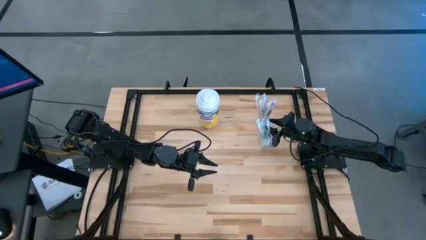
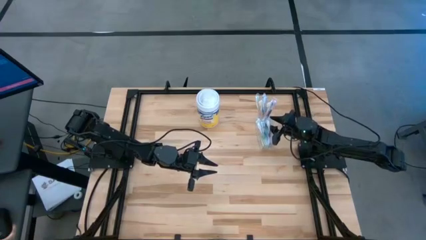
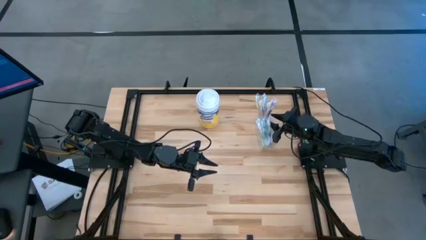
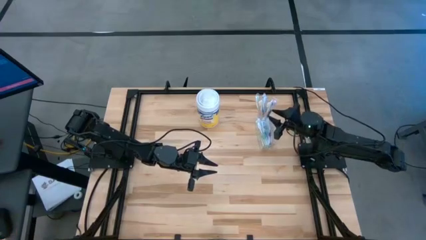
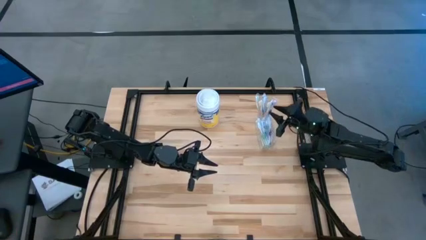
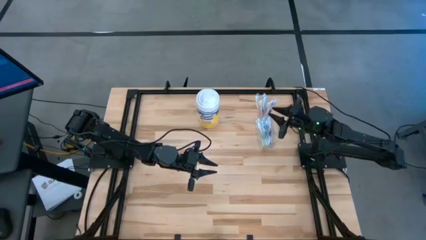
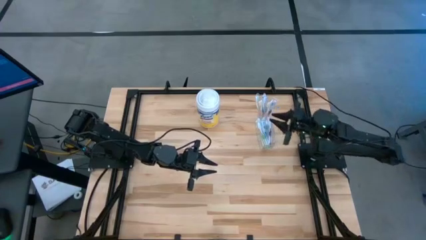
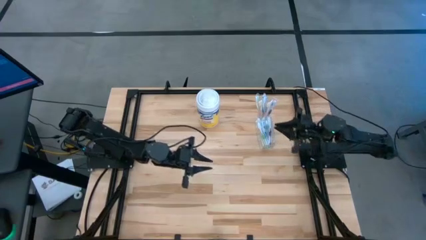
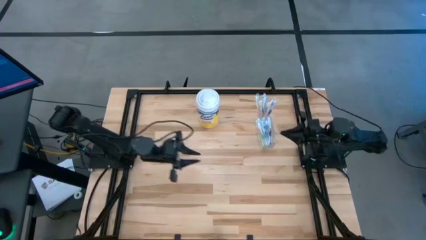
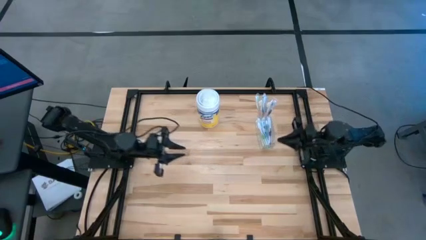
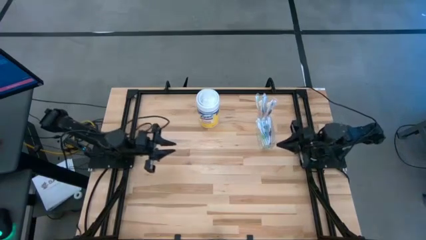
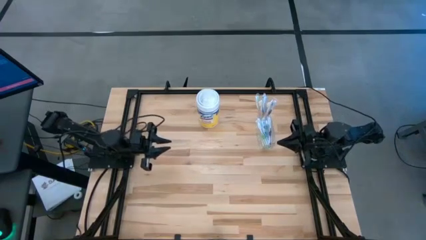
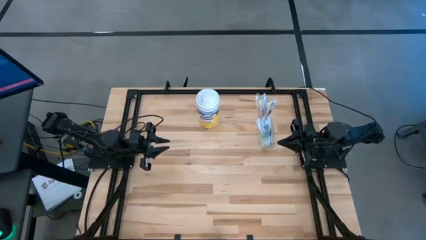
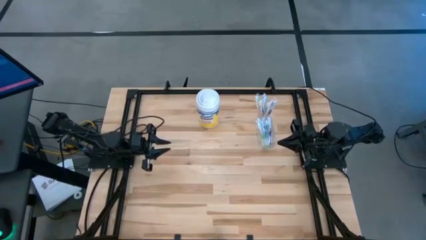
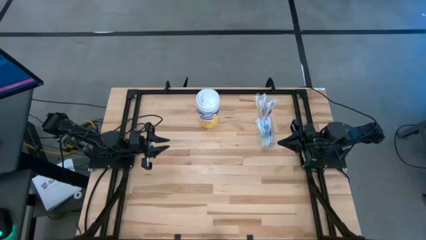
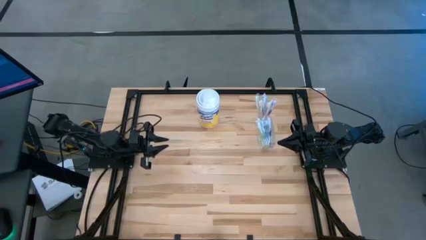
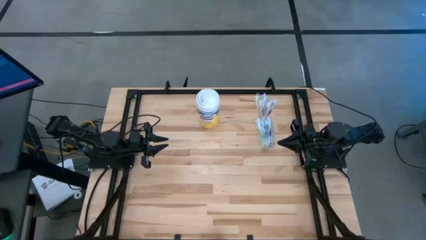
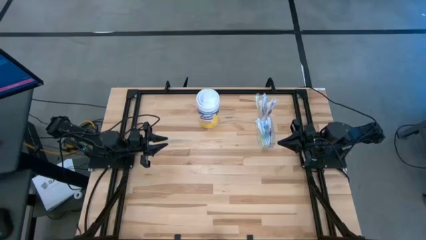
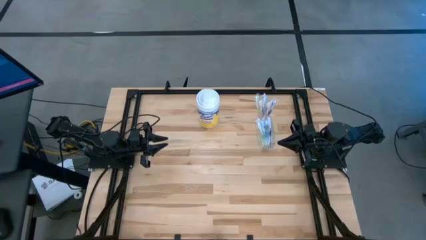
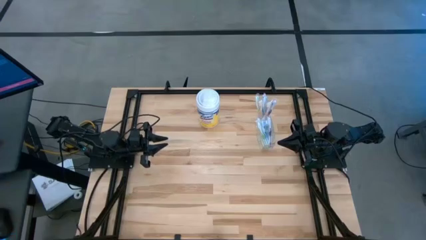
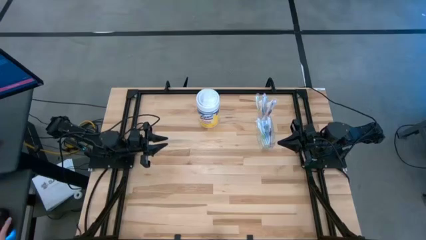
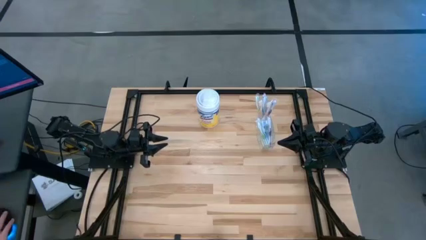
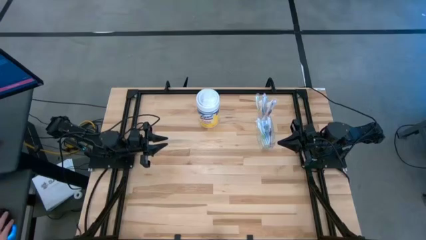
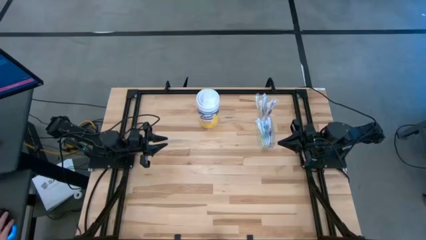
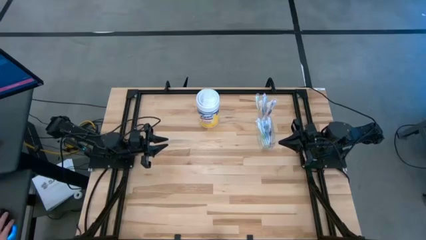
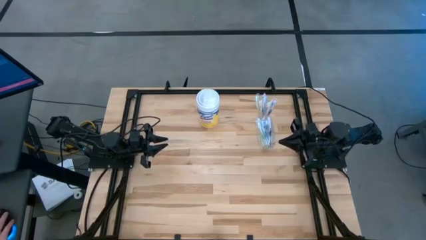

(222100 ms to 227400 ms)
Task: Pick & Place toothbrushing station
Return to Home Position

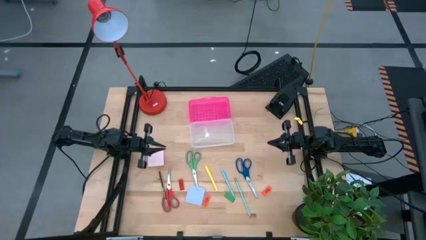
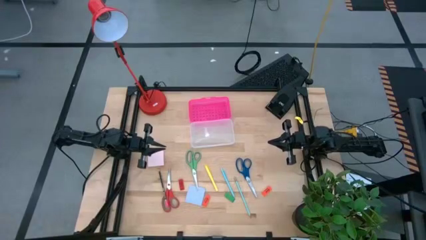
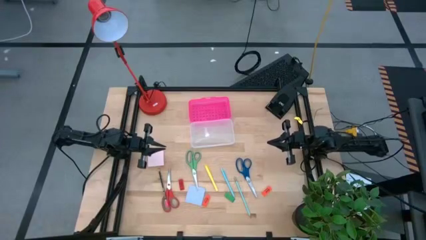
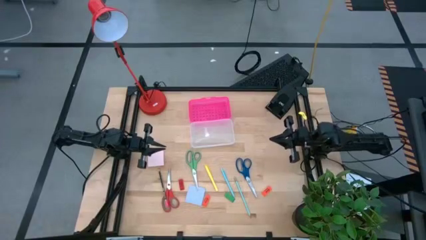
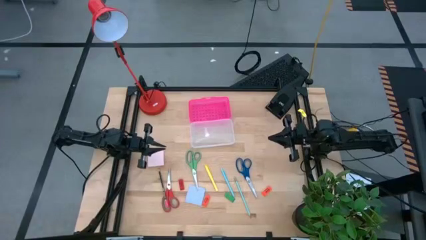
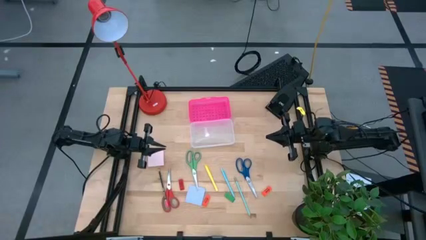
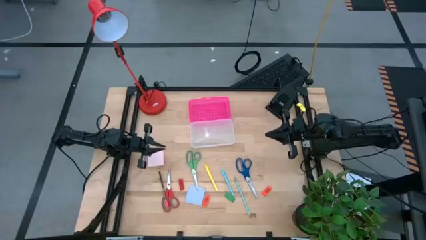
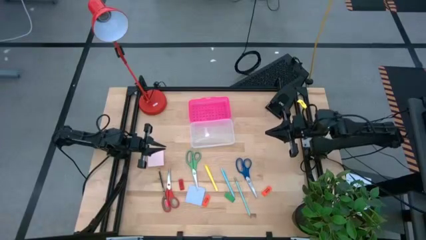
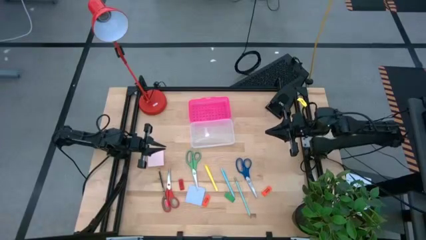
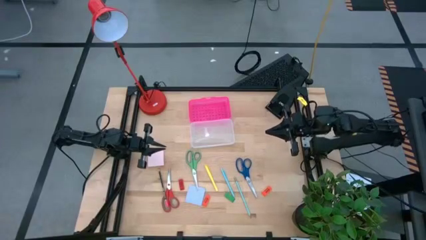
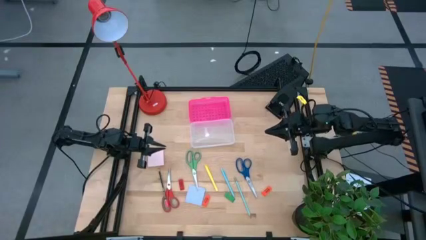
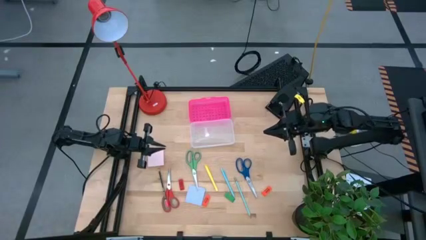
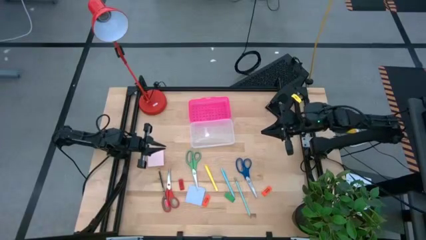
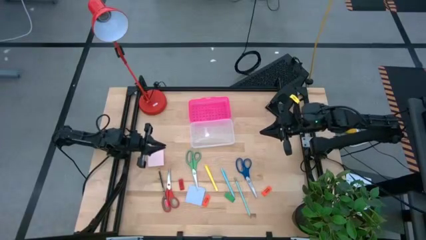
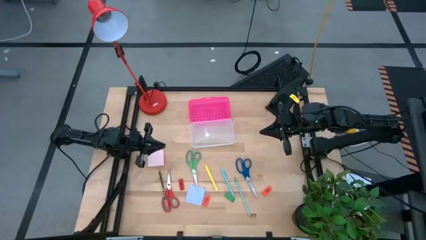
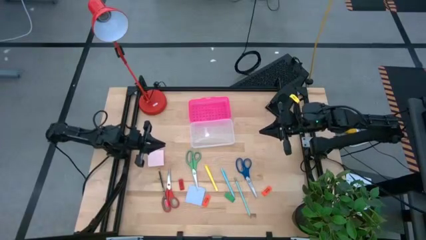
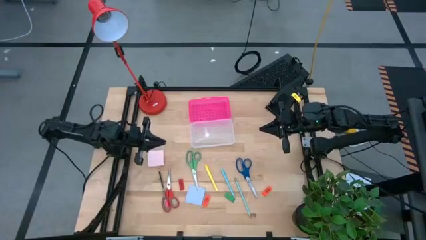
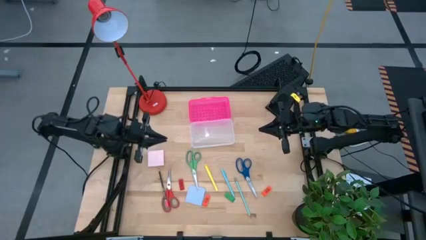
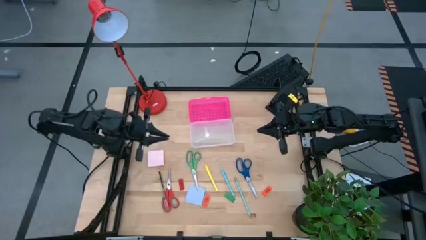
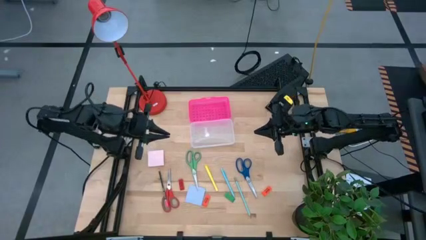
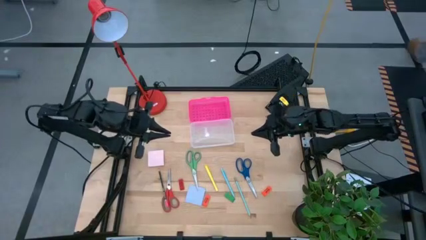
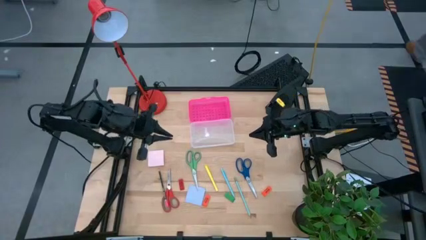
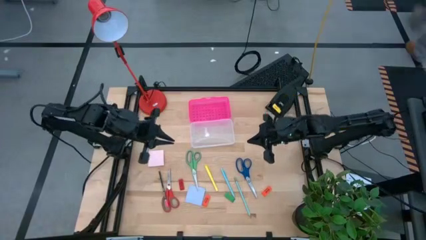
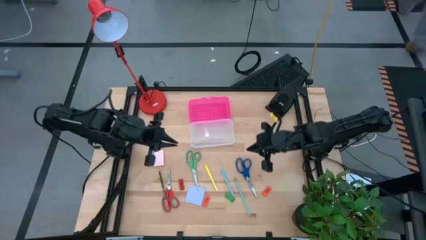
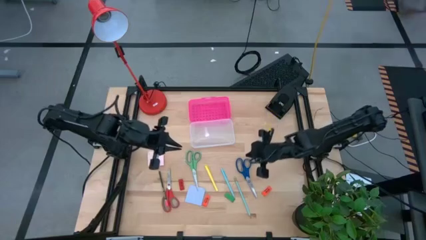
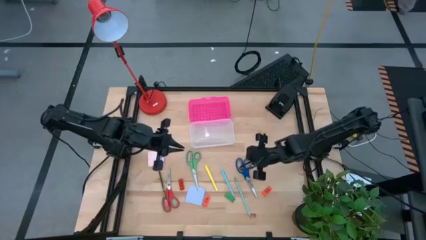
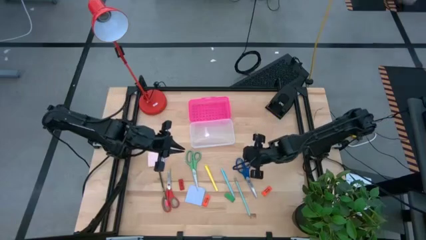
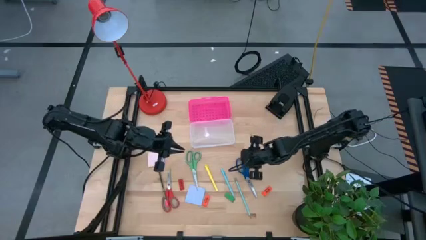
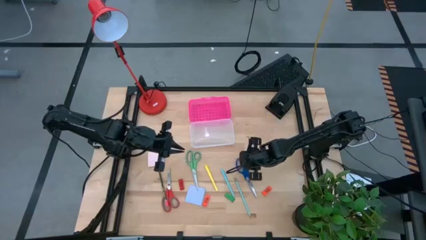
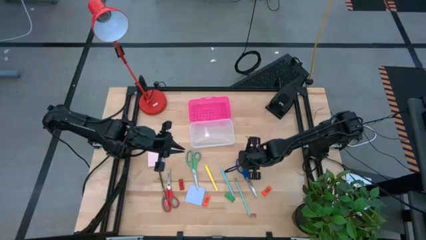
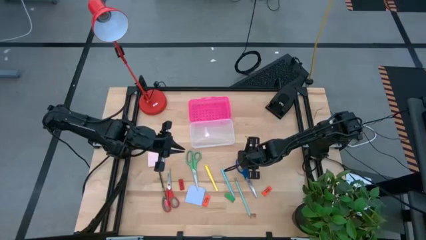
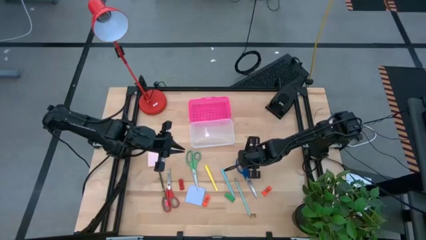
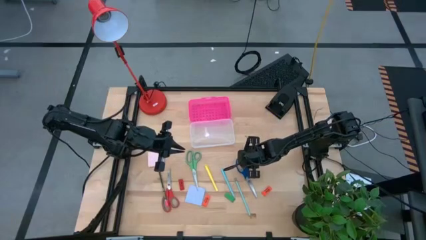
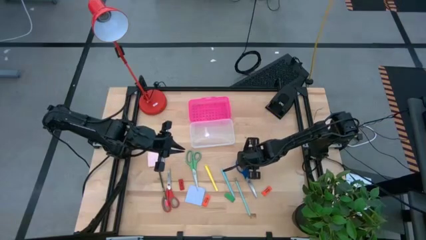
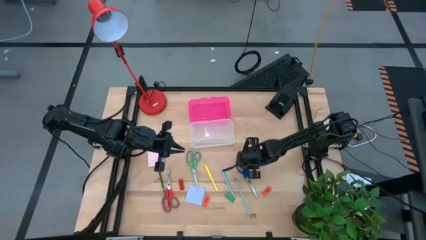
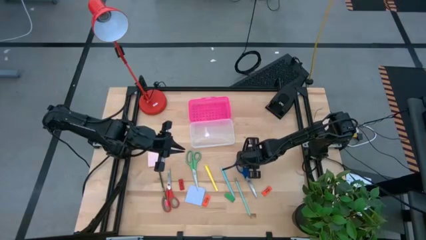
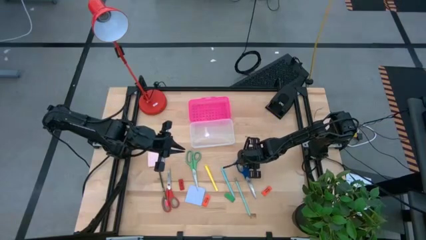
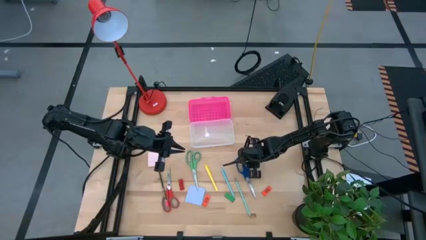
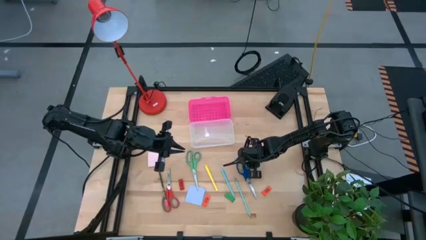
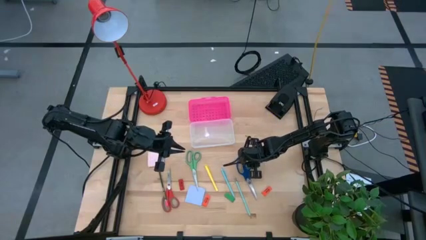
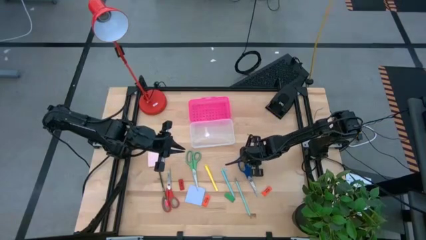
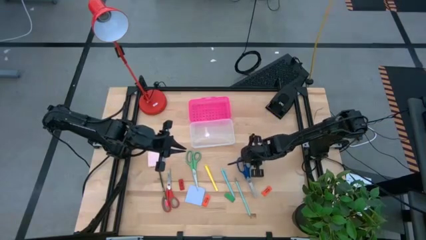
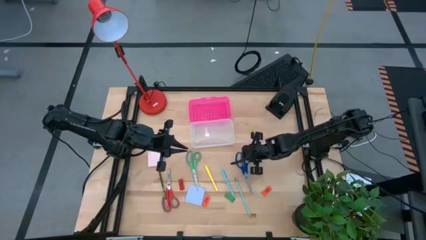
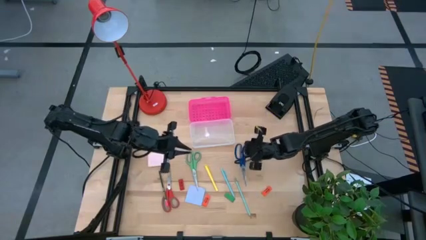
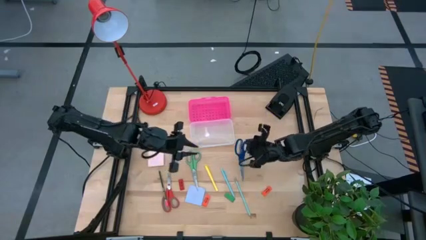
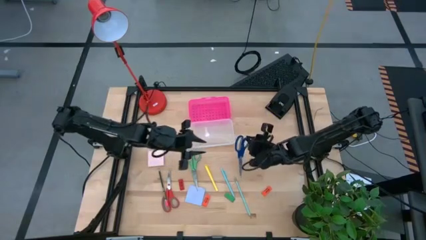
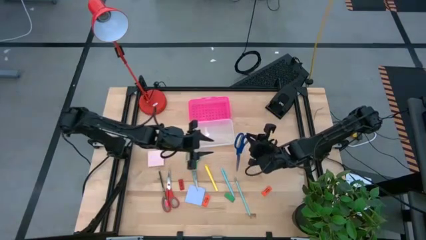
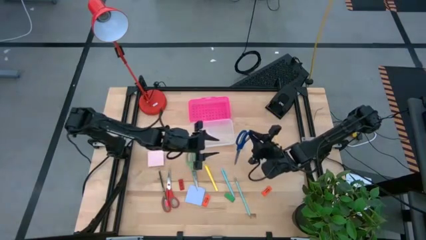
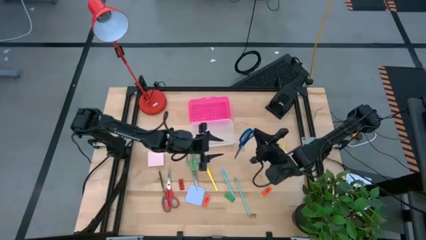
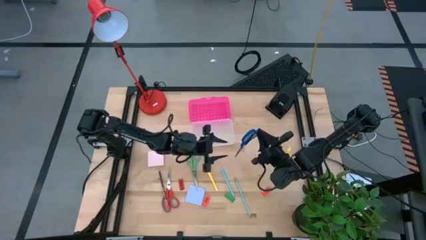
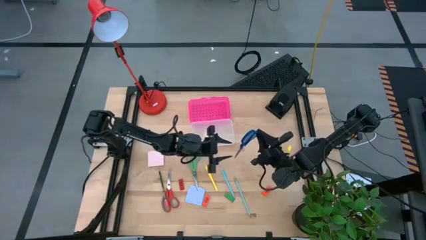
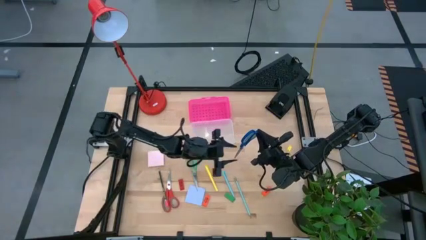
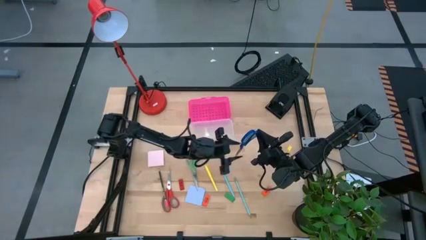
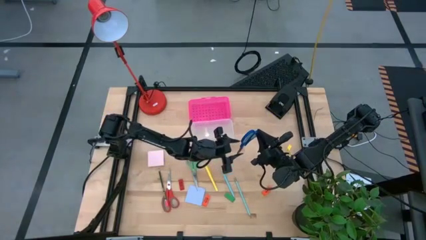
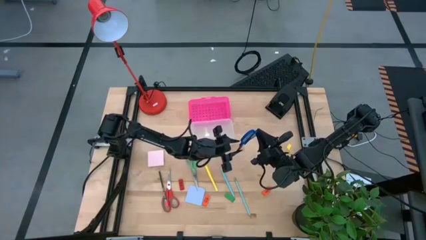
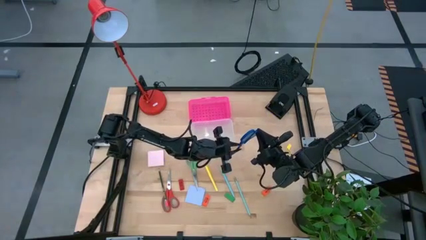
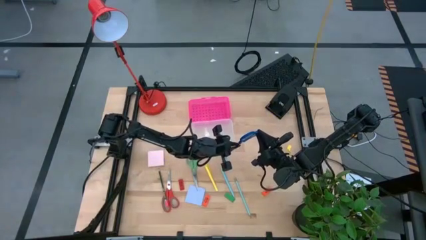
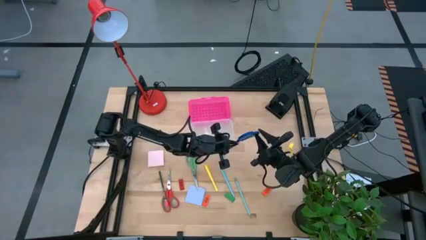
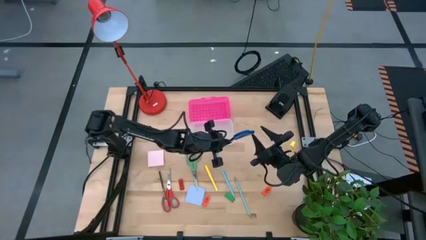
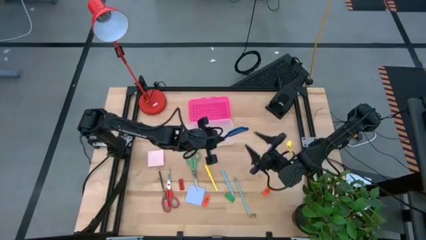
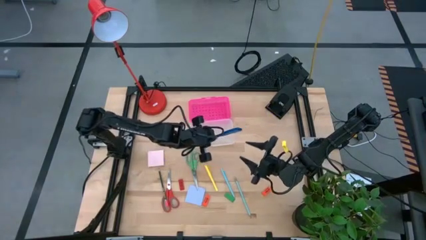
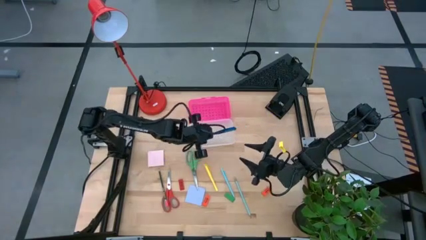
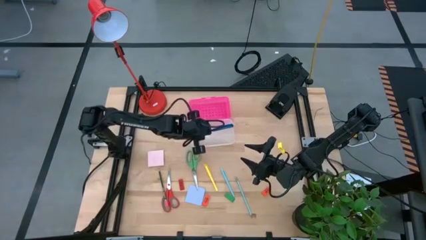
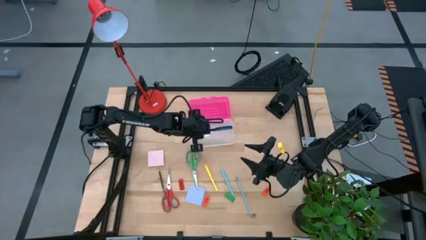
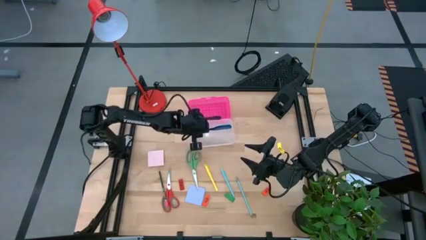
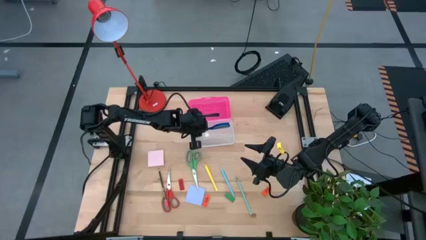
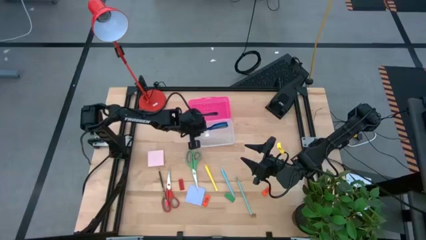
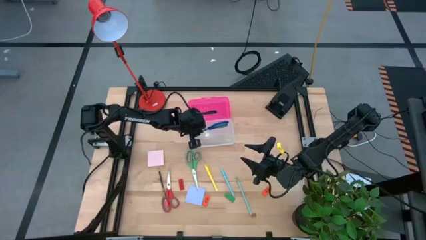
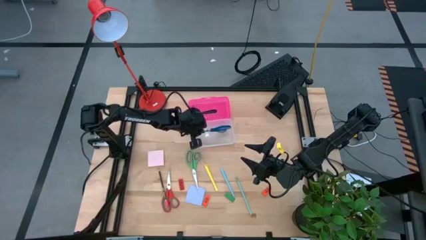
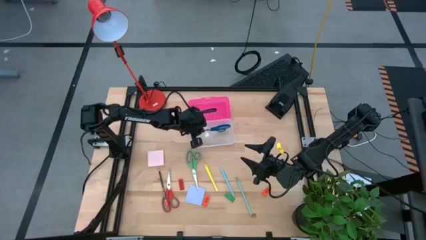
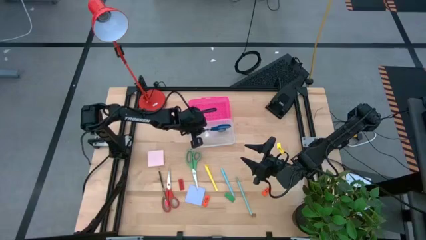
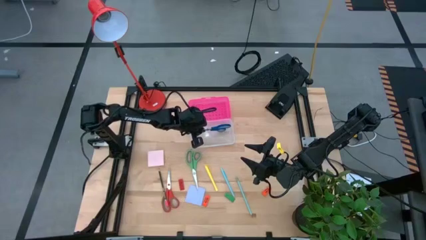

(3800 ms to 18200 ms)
Task: Pack school essentials
Put the blue scissors into the pink supply box
